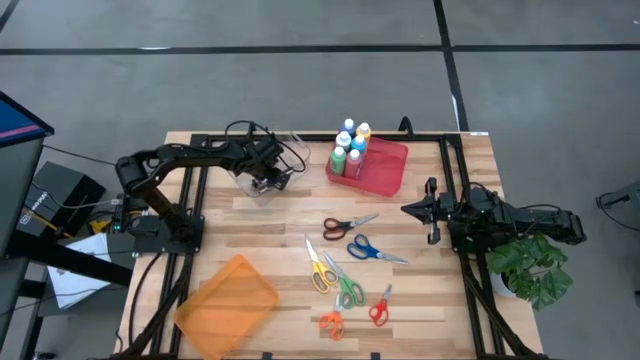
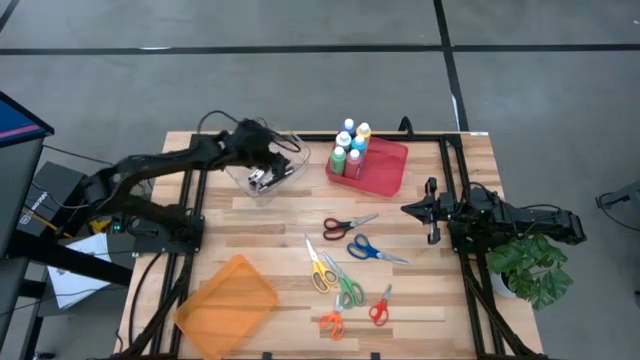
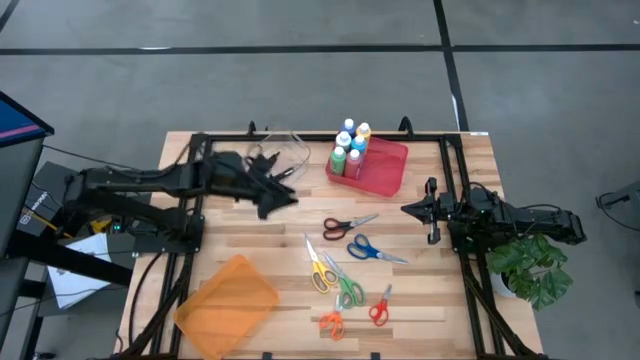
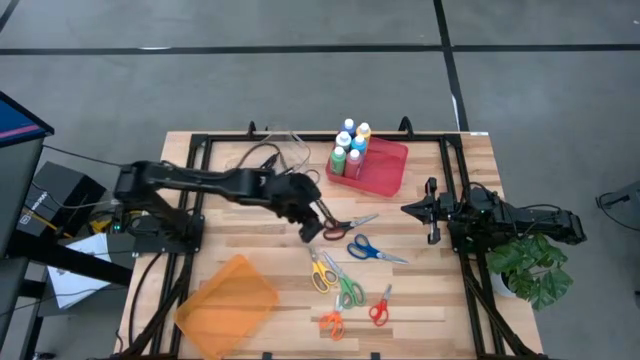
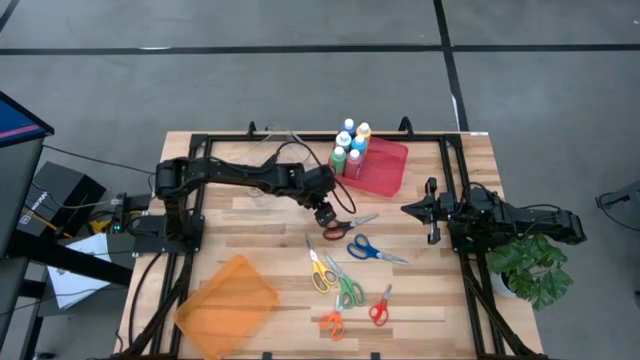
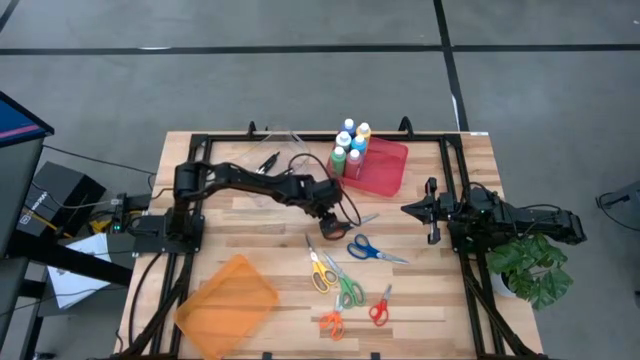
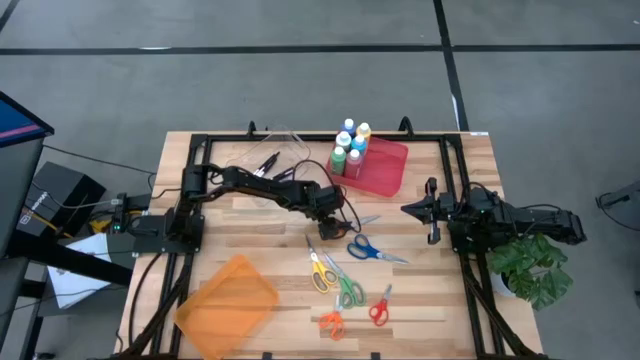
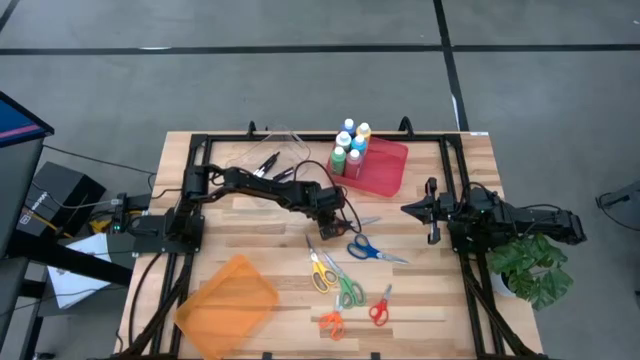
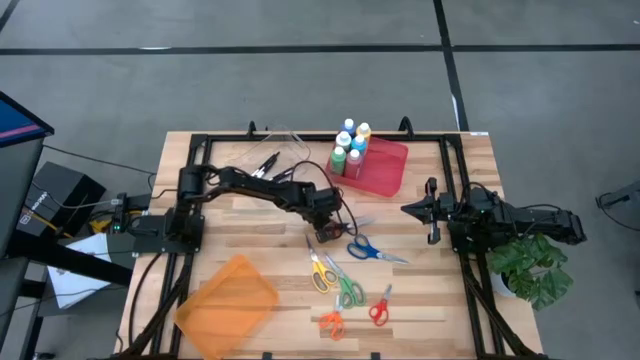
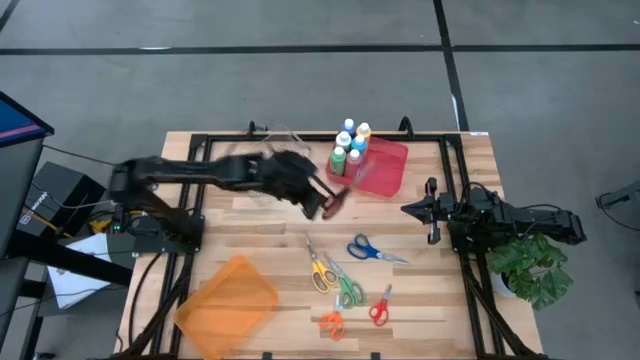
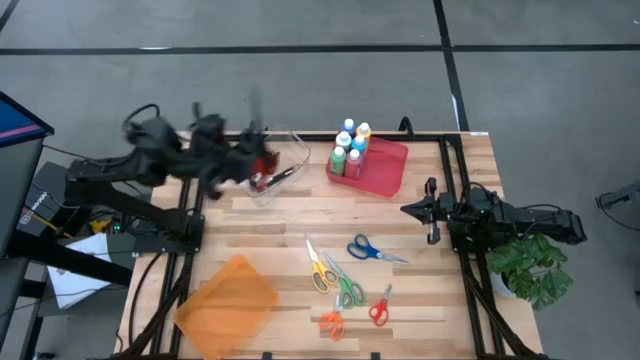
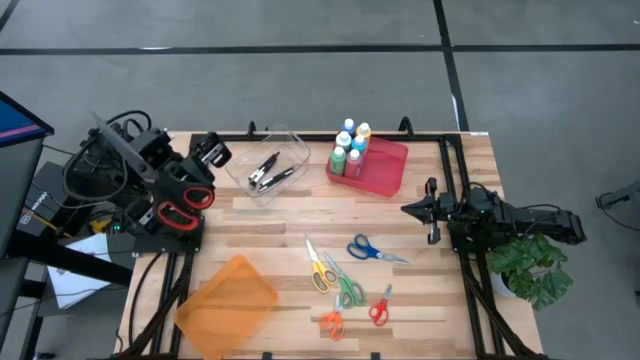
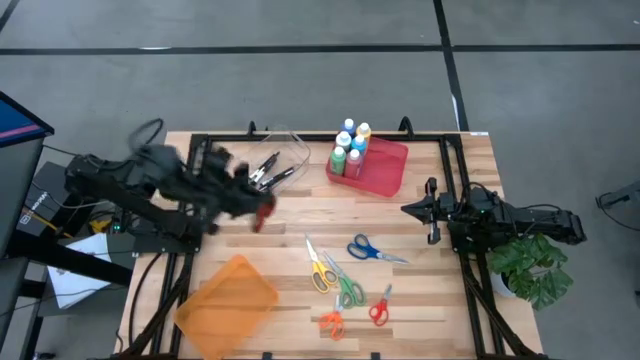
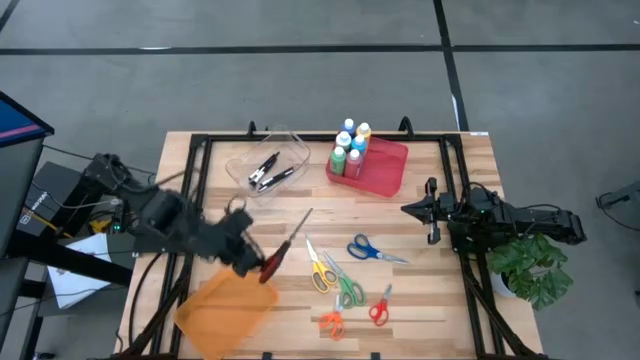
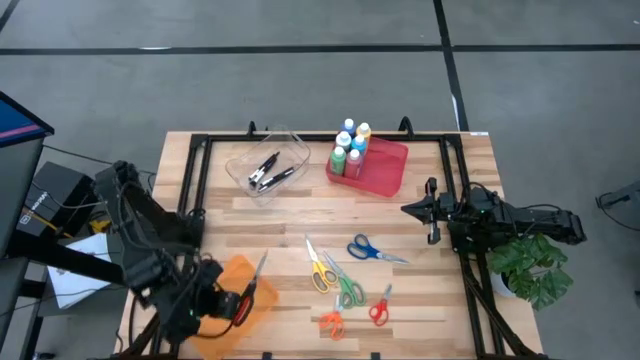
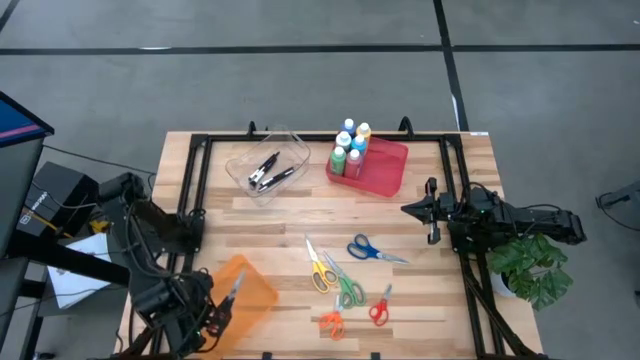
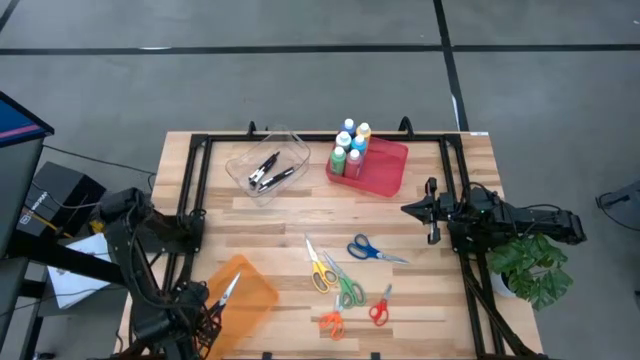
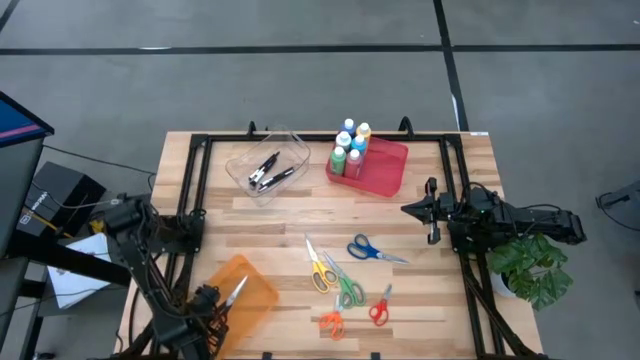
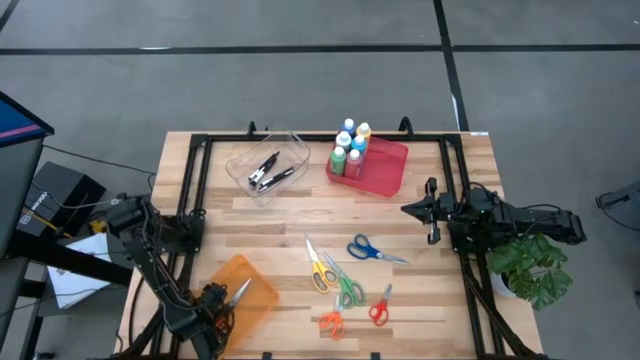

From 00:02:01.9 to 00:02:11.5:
Task: Pick & Place Paint Supplies
Put the black scissors into the orange bin

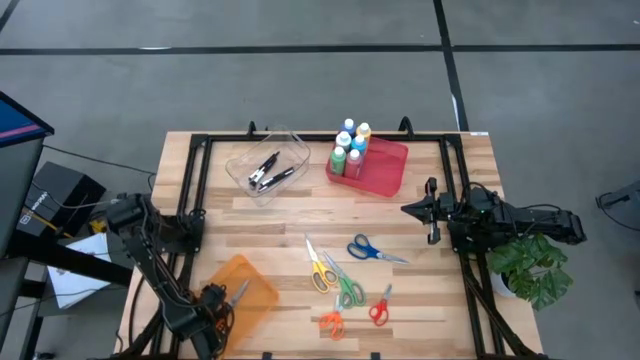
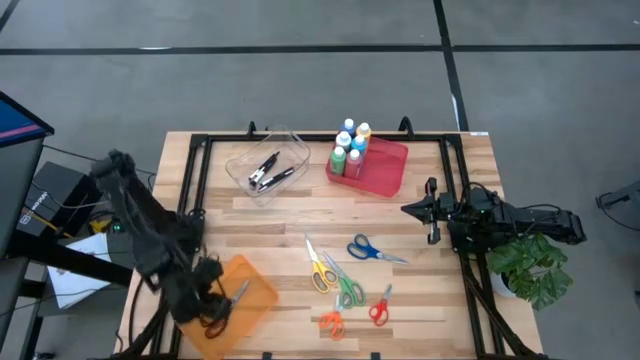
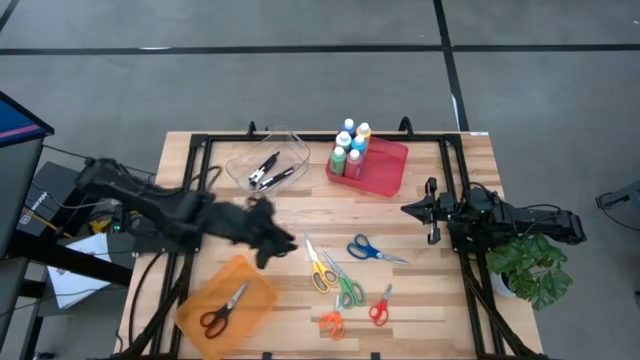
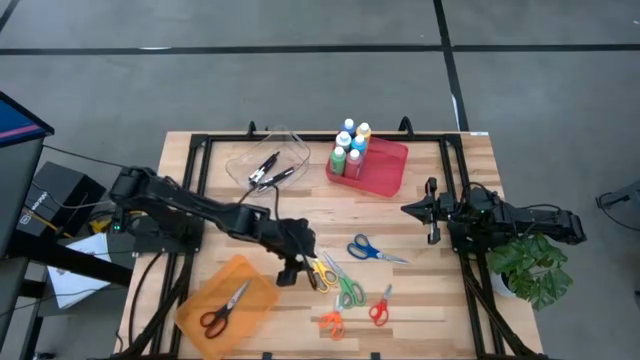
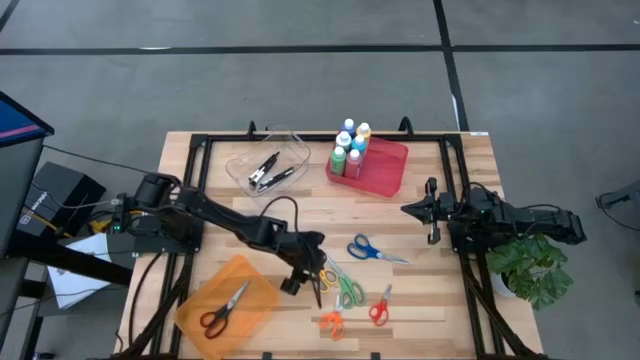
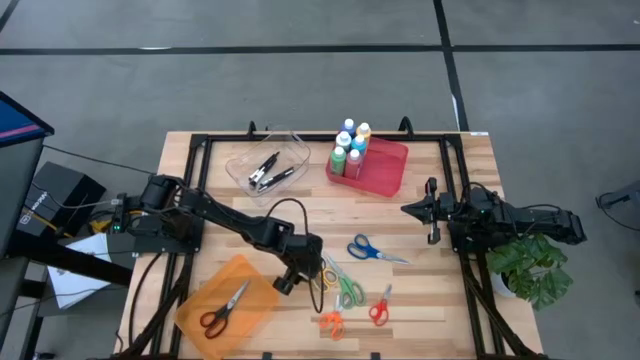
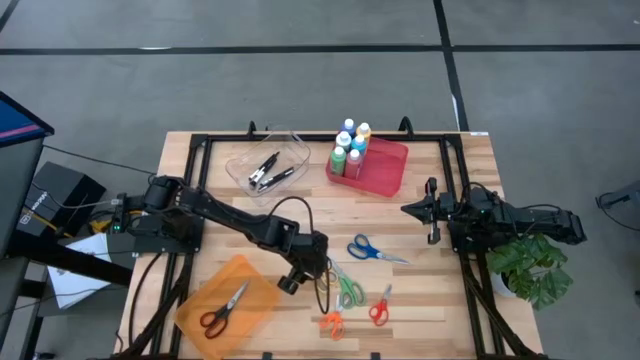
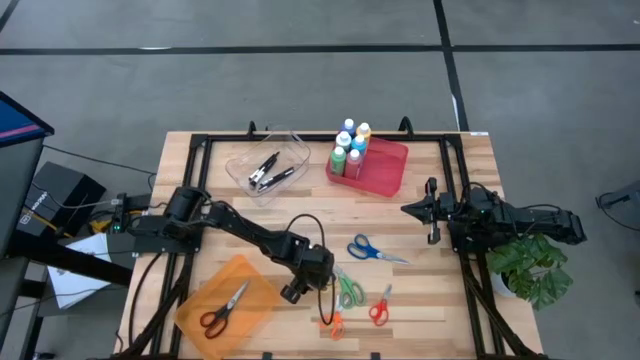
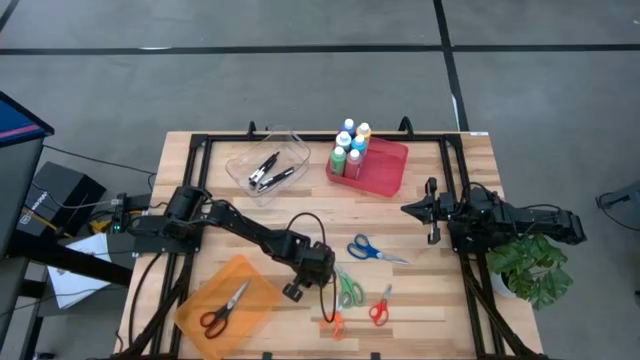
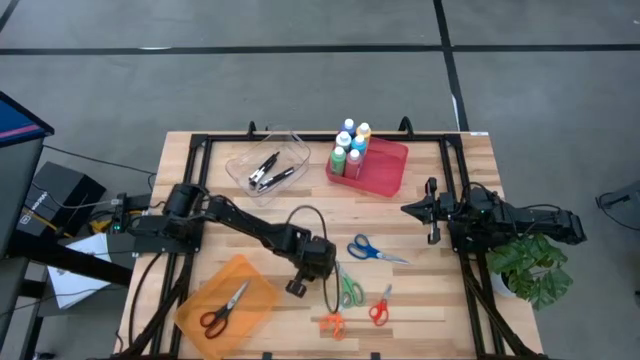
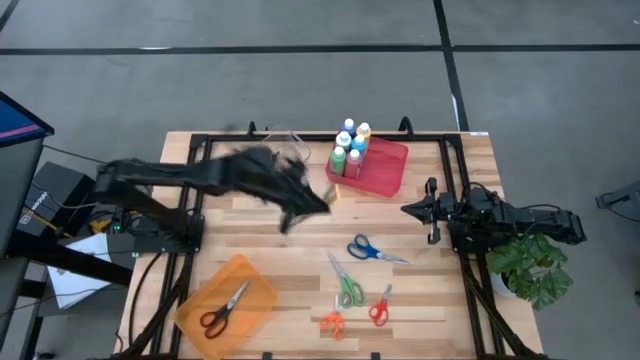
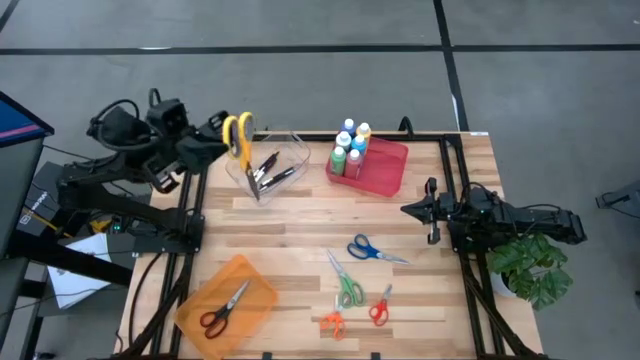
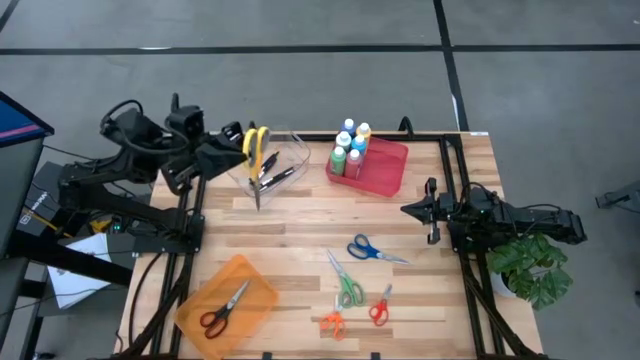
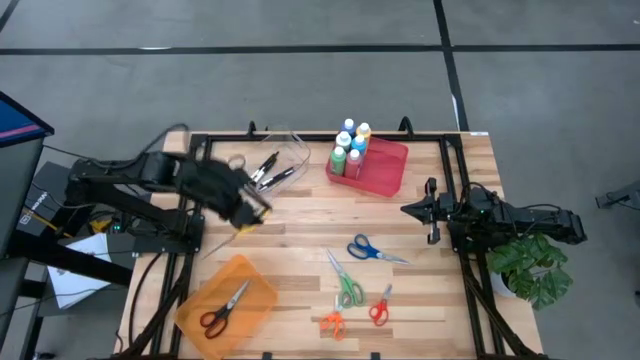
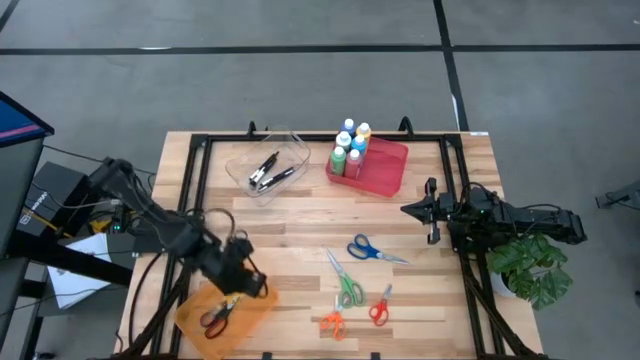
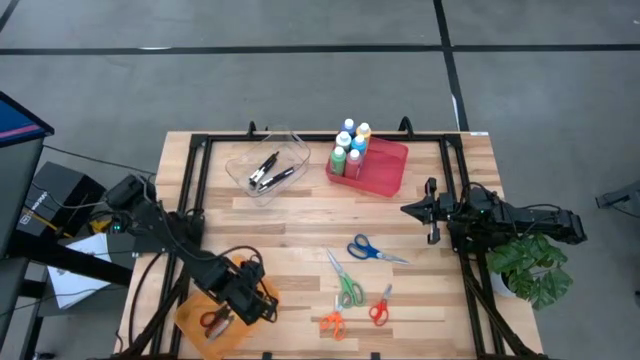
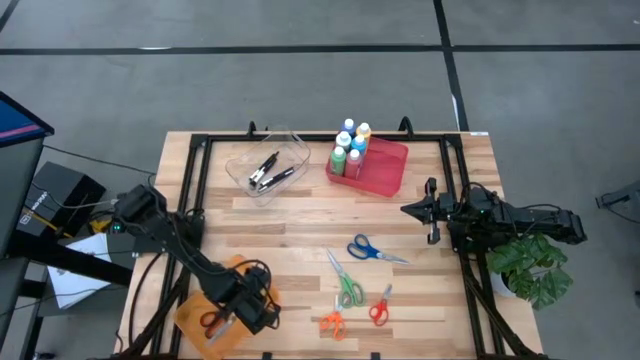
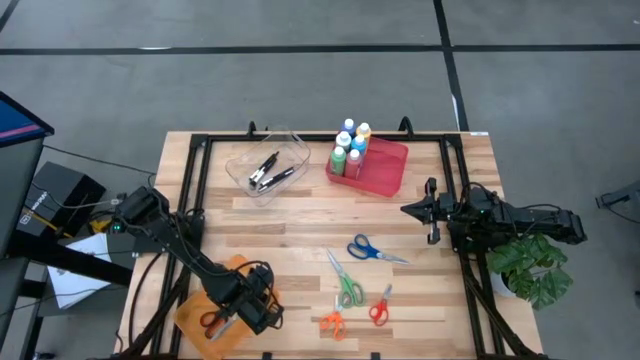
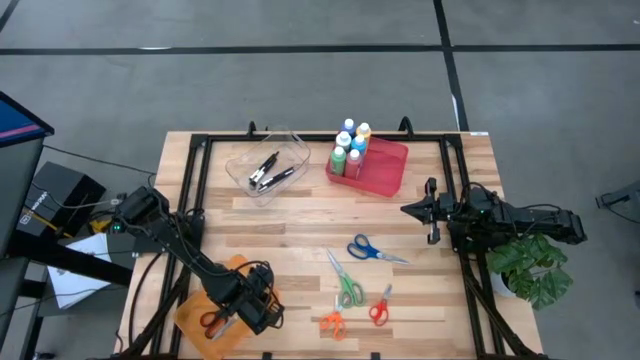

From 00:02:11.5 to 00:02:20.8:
Put the yellow scissors into the orange bin

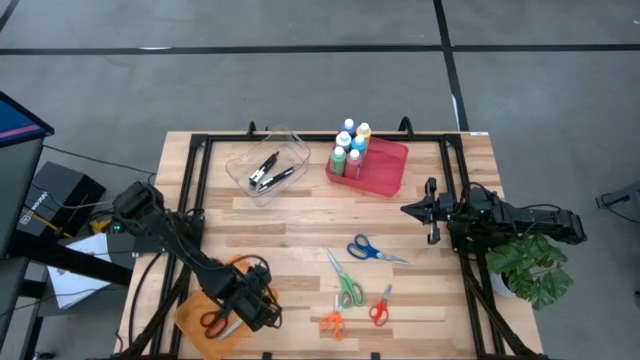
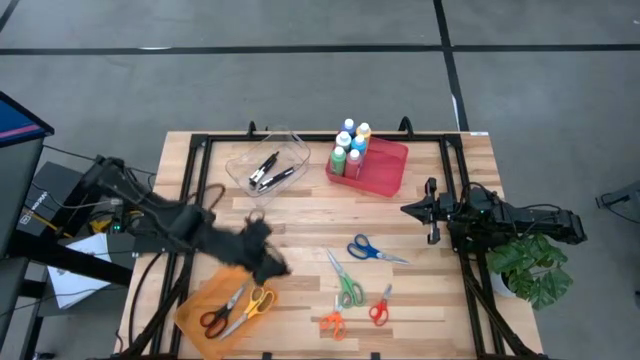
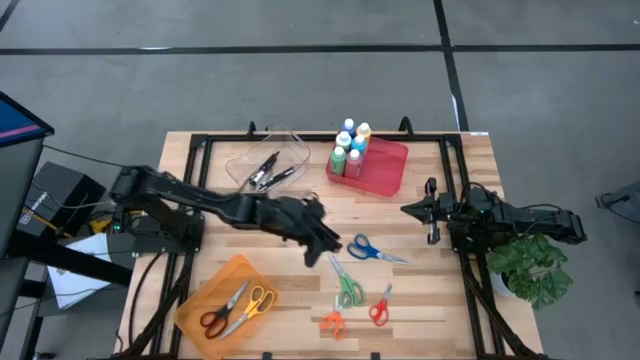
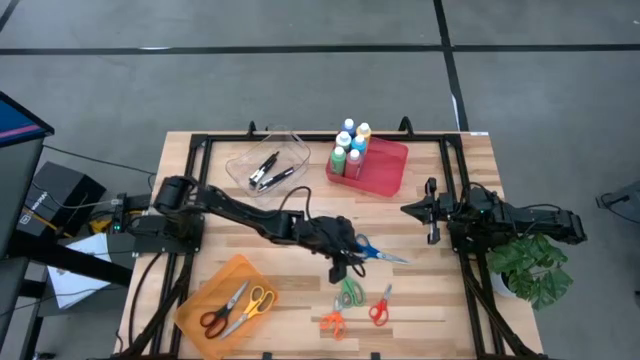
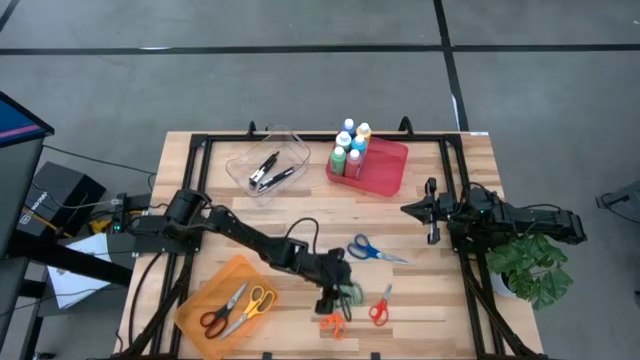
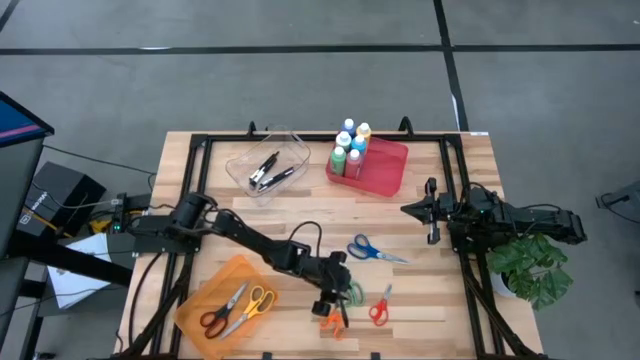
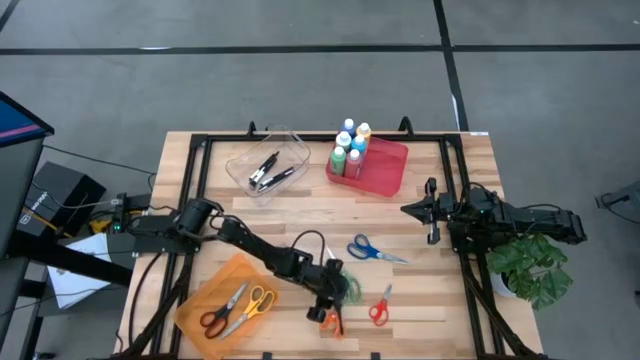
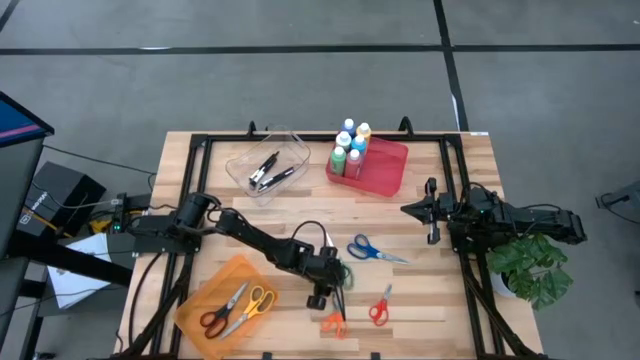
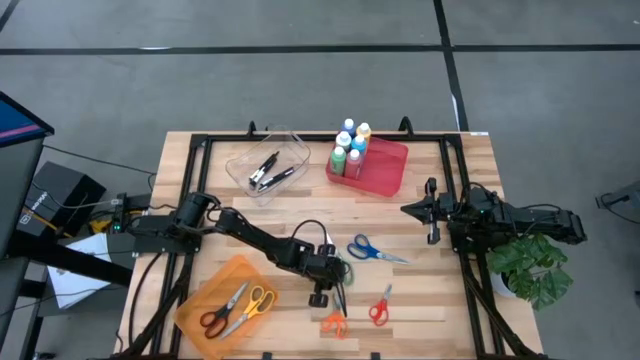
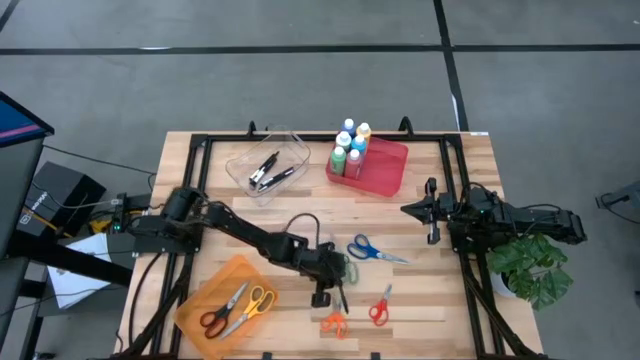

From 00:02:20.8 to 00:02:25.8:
Put the green scissors into the orange bin
